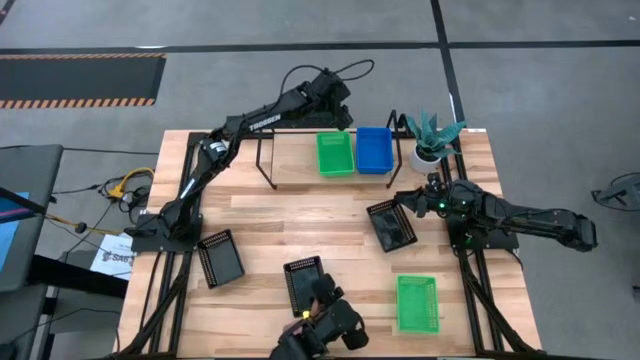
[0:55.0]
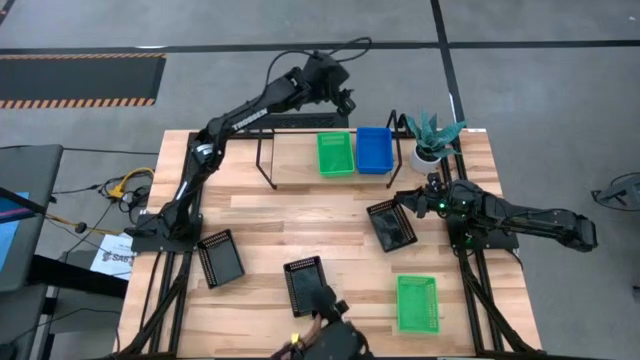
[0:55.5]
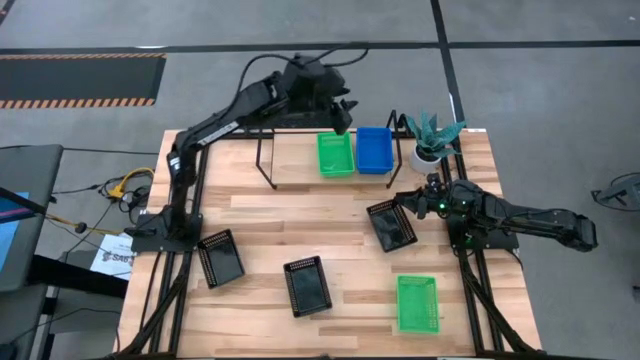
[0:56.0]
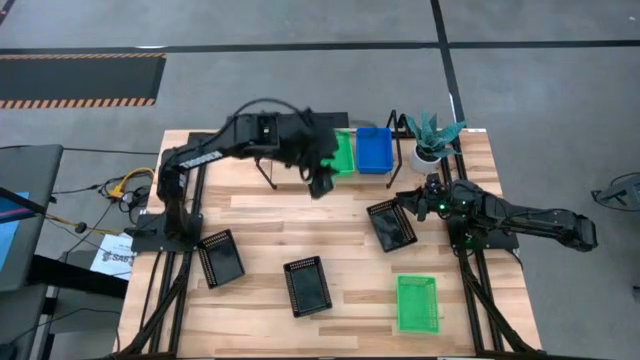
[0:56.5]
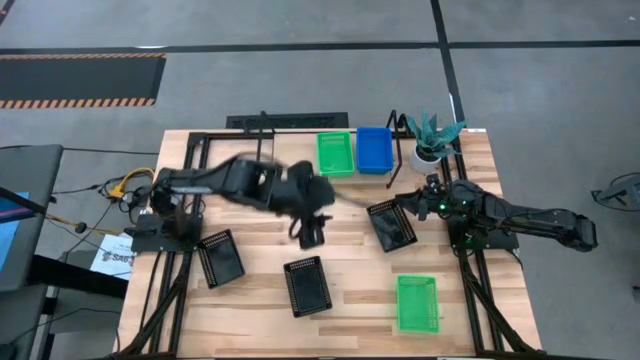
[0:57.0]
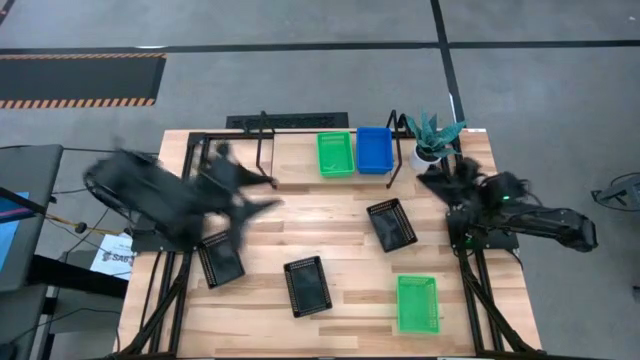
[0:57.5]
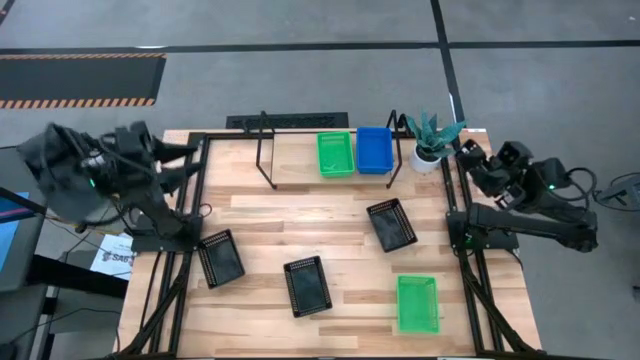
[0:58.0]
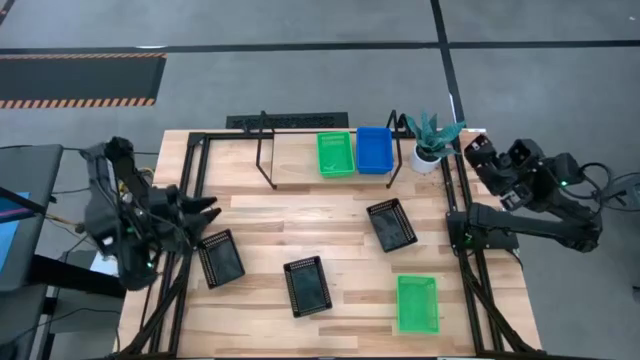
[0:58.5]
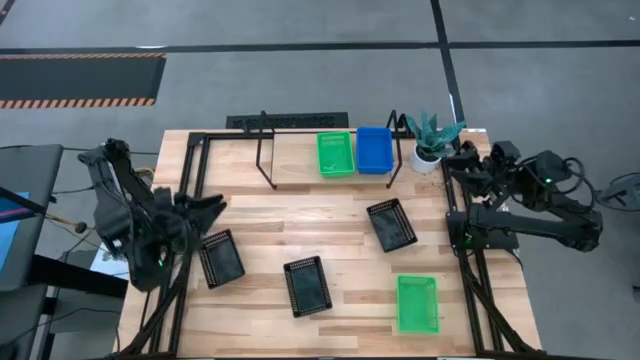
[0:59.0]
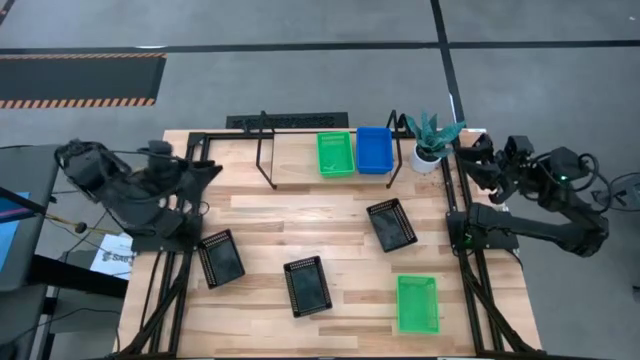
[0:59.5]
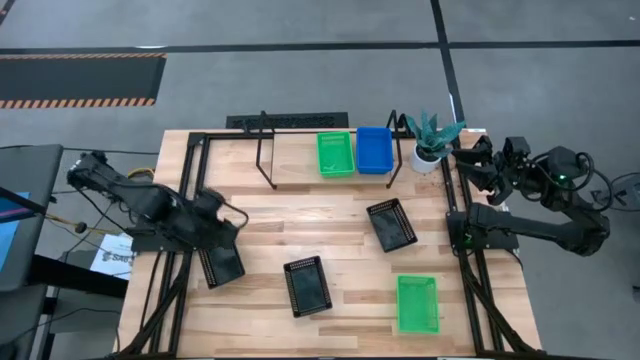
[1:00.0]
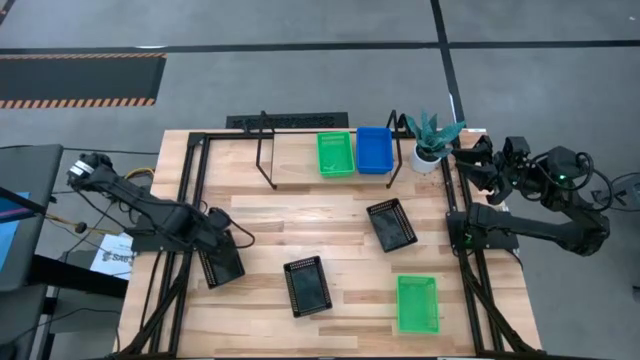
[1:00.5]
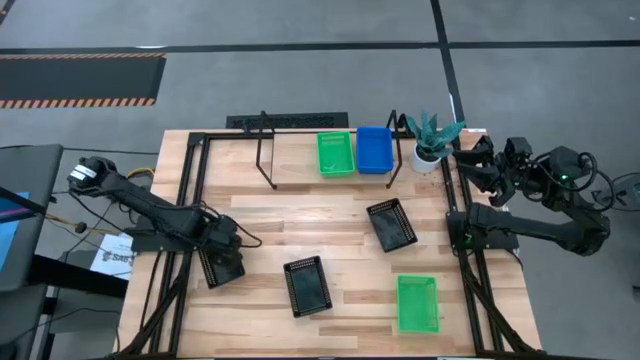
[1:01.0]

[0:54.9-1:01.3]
Task: Stack baskets on shelf by color
Put the top left black bin on the shelf

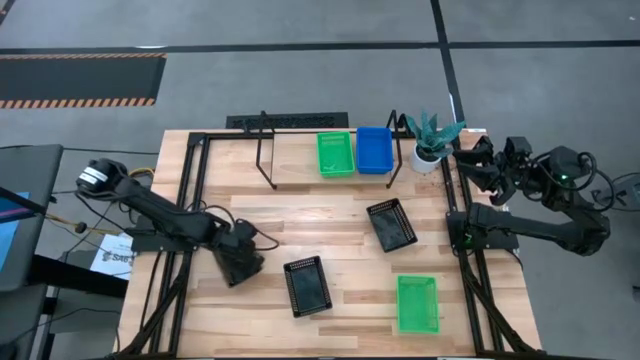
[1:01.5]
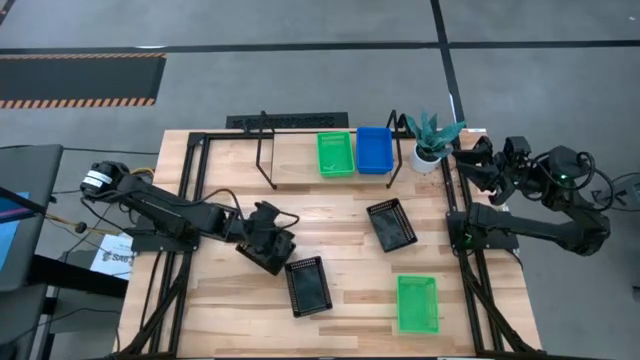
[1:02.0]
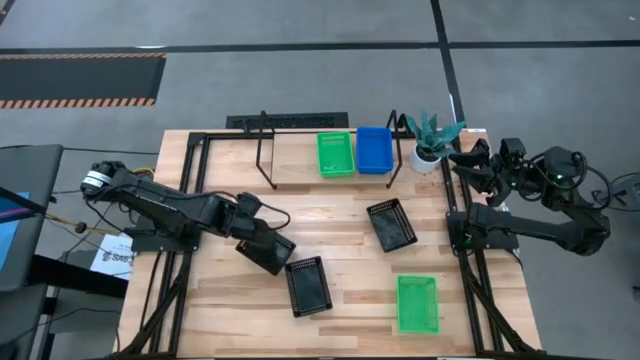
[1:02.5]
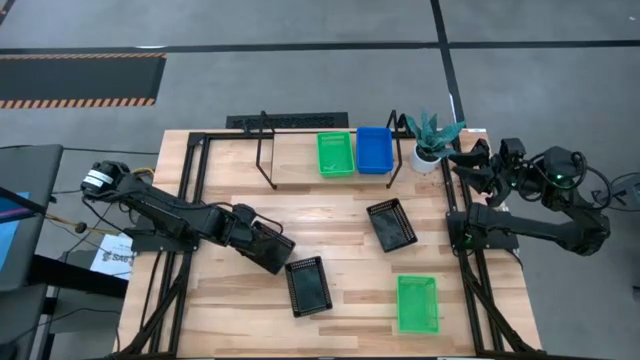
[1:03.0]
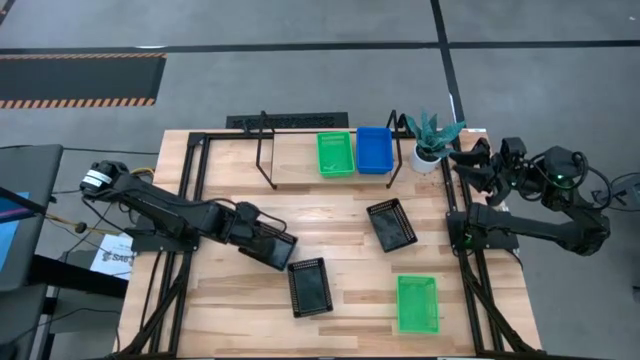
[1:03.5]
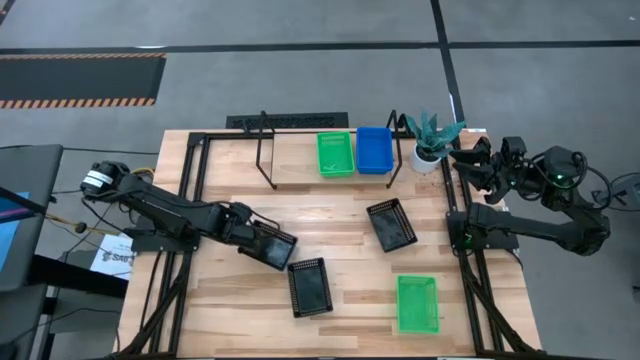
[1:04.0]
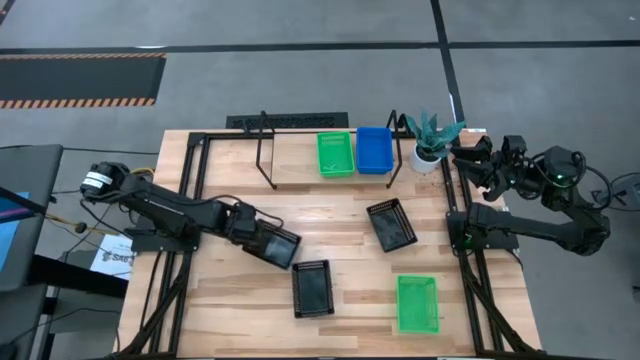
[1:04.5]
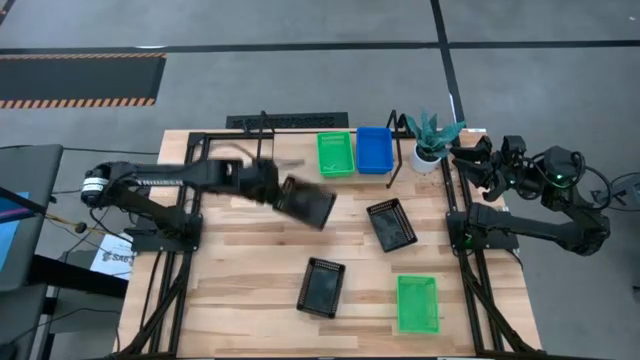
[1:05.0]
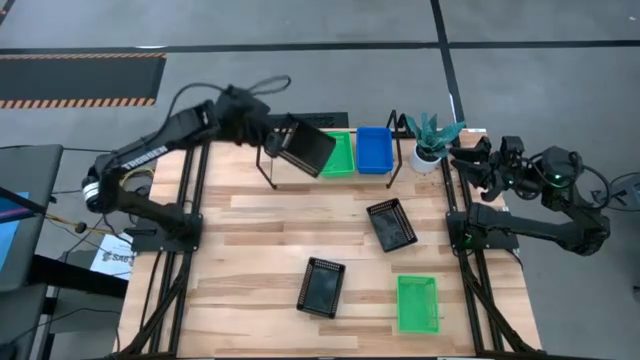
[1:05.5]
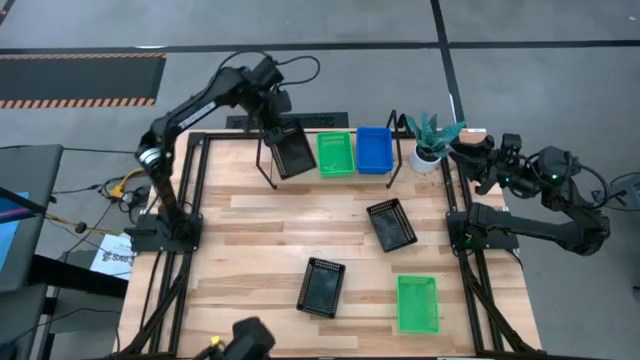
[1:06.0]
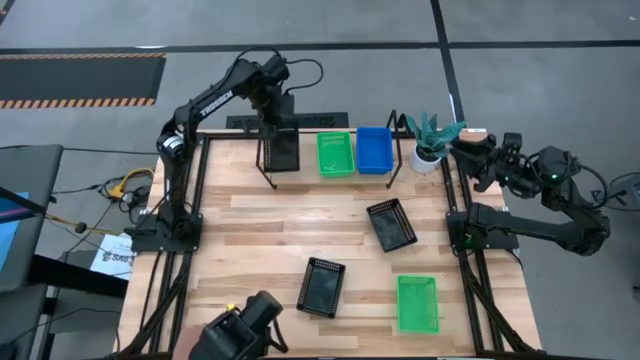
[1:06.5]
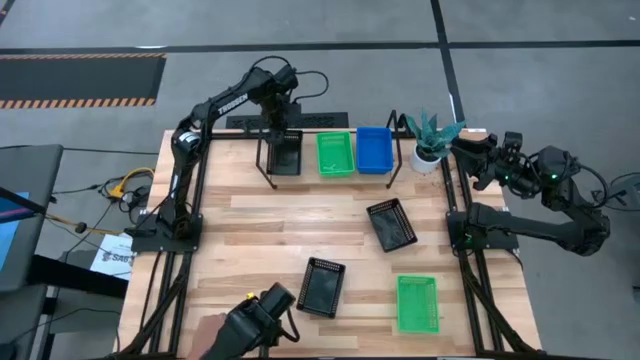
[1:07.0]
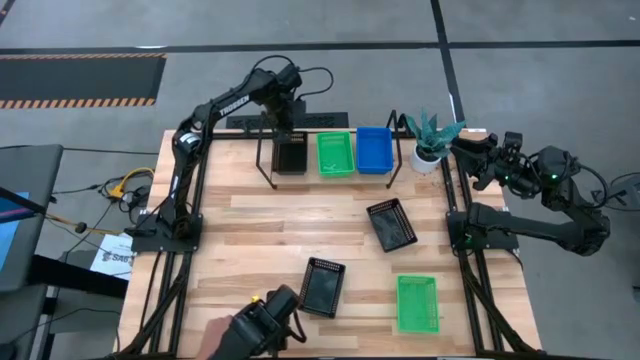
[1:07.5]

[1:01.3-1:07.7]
Put the top left black bin on the shelf

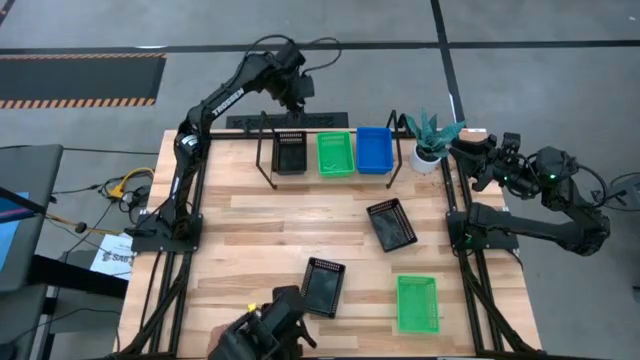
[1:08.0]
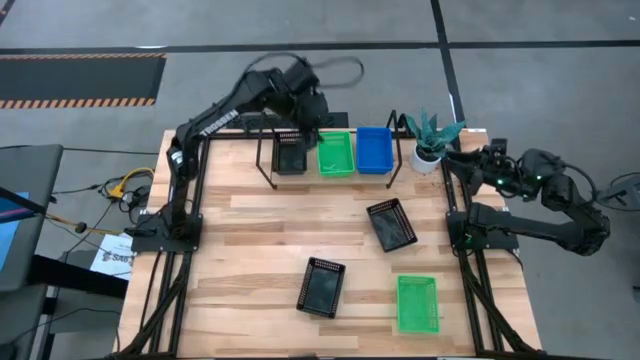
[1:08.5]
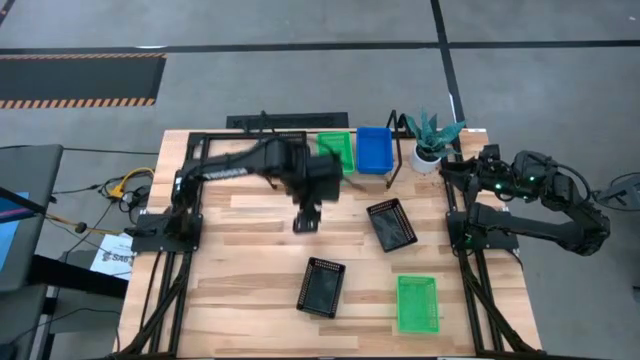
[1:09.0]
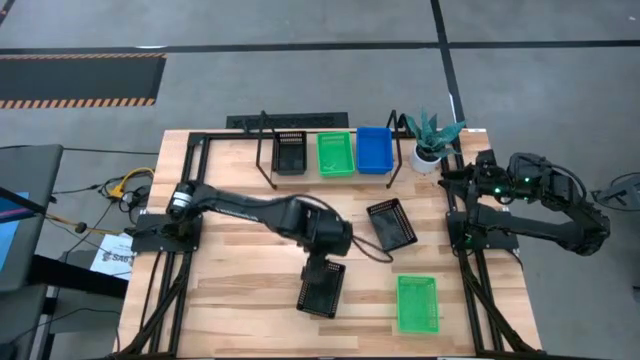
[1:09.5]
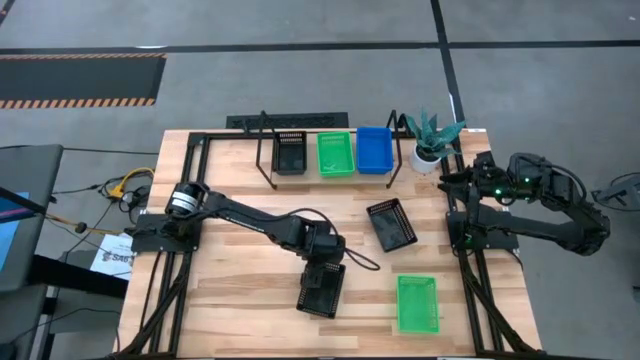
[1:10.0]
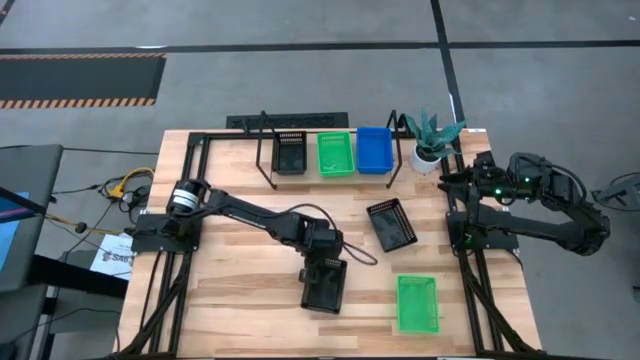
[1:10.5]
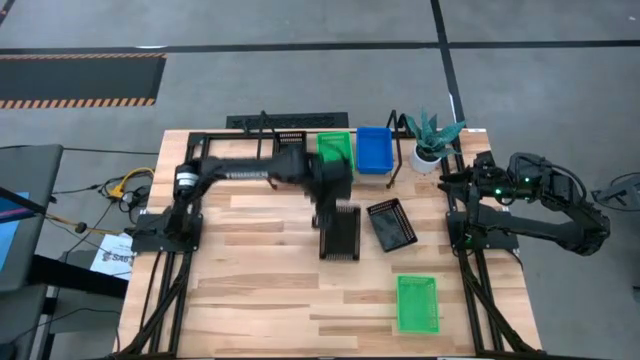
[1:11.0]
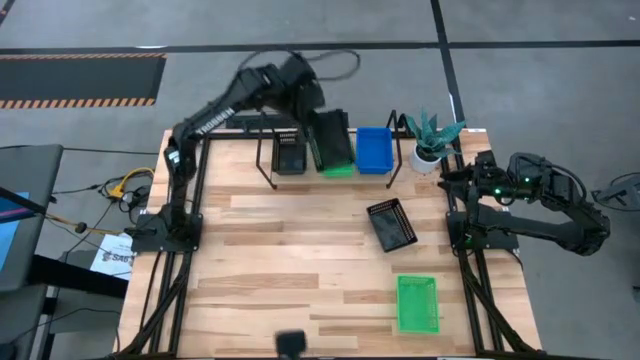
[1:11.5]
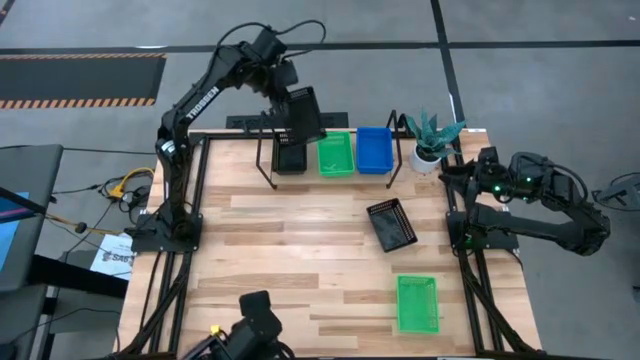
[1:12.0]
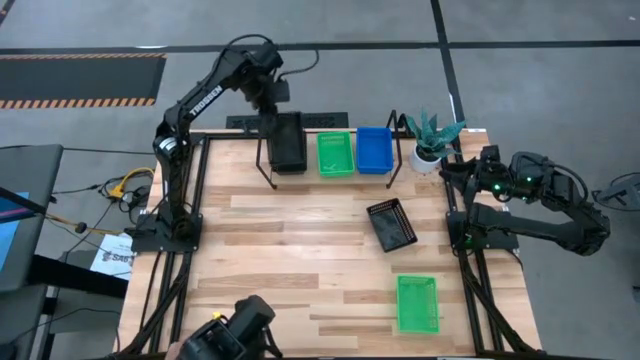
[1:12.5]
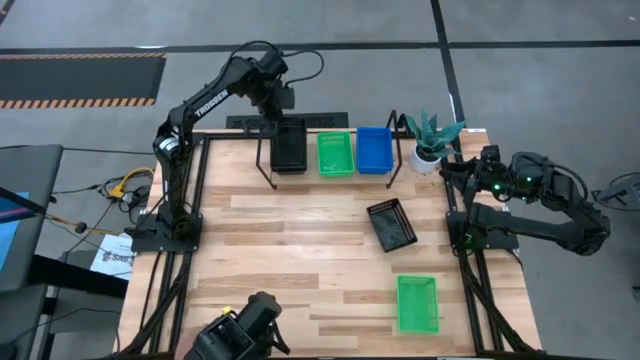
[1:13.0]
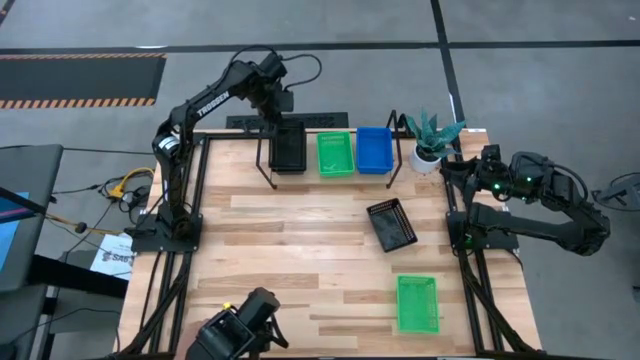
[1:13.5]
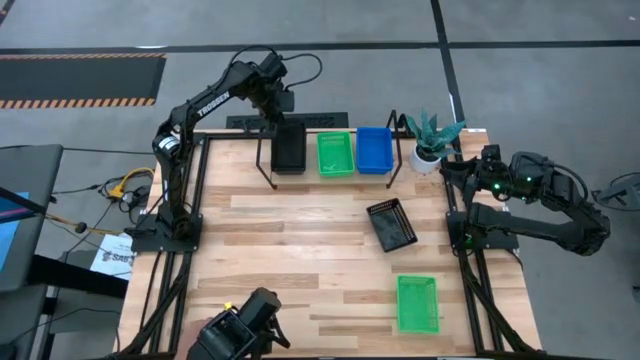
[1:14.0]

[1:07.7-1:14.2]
Stack the bottom black bin on top of the other black bin on the shelf

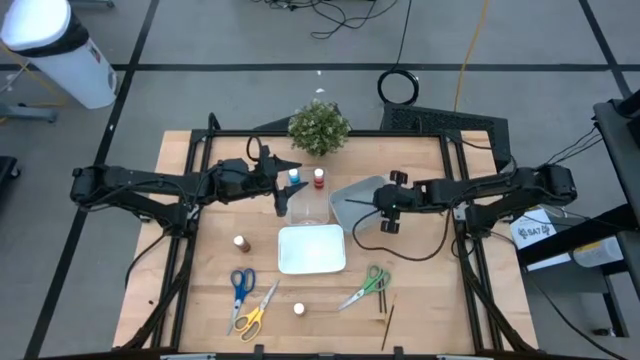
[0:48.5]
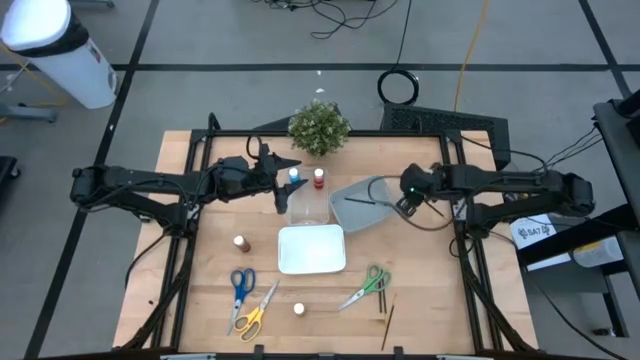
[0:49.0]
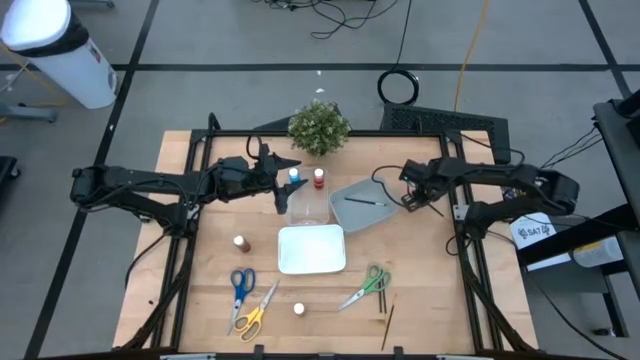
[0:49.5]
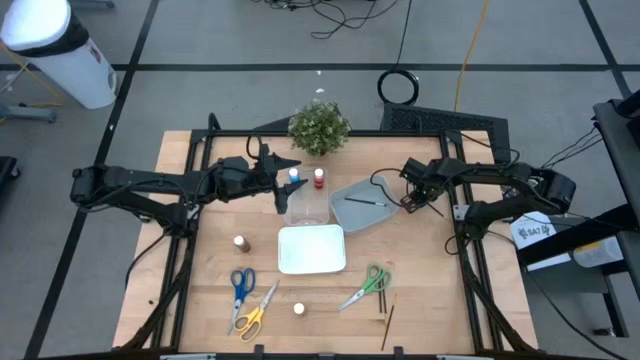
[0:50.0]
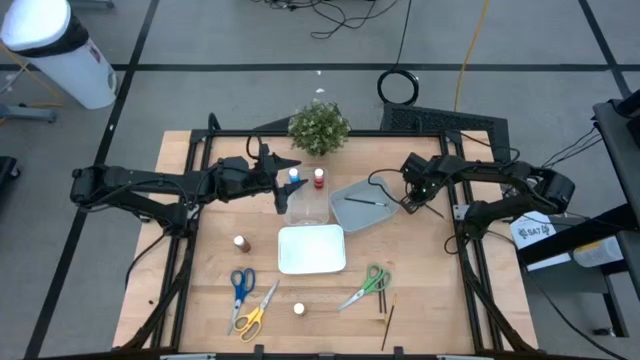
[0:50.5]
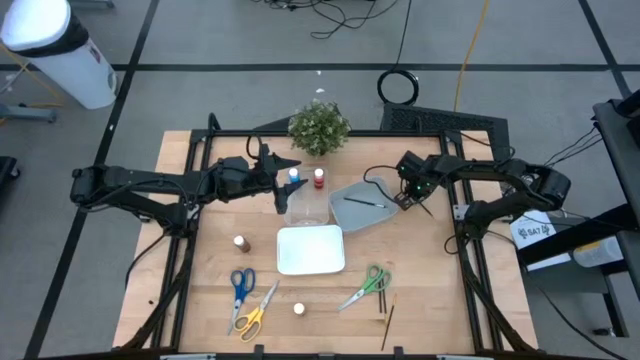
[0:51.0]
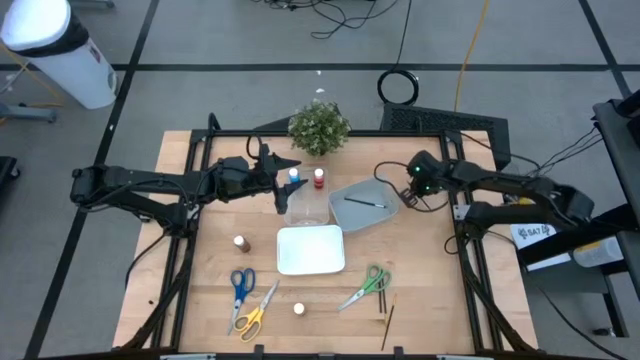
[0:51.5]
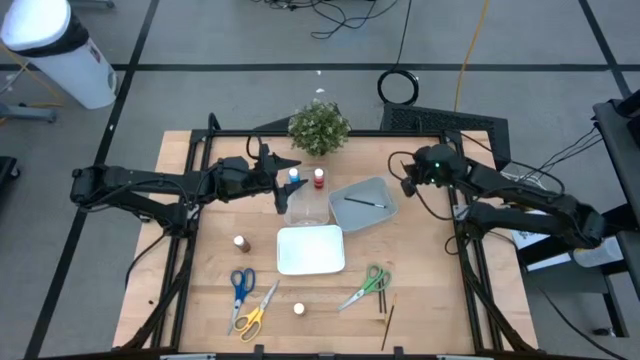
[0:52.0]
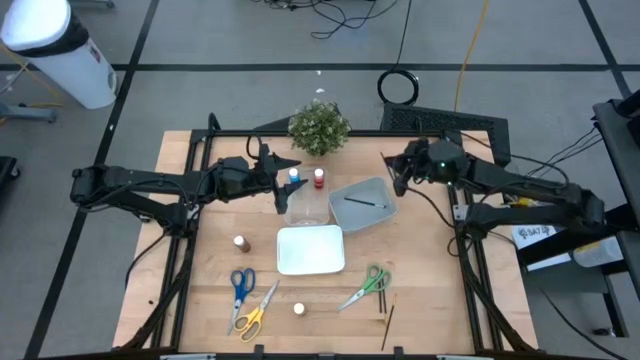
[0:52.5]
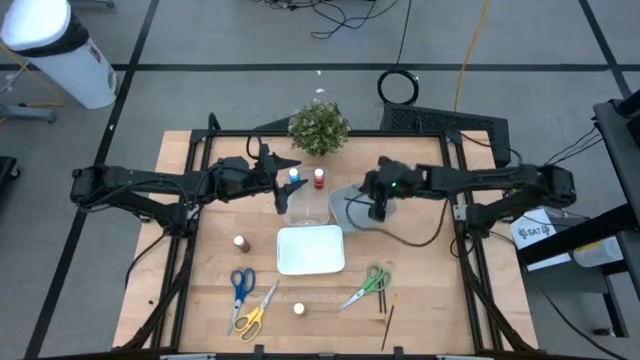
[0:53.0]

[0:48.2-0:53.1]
Task: Pick & Place Paint Supplies
Put the gold paintbrush into the gray bin
